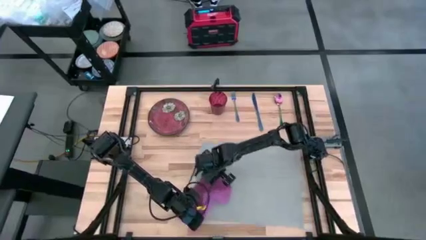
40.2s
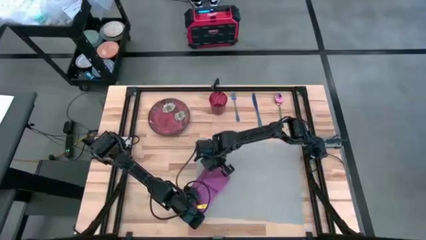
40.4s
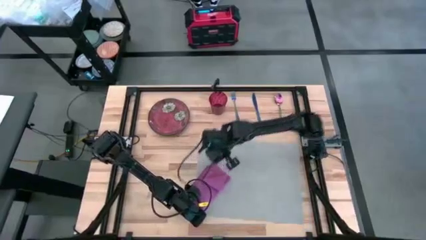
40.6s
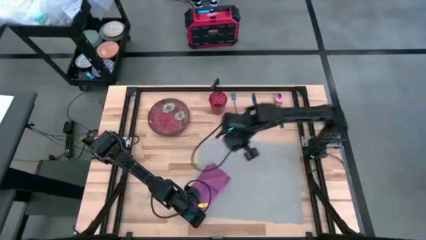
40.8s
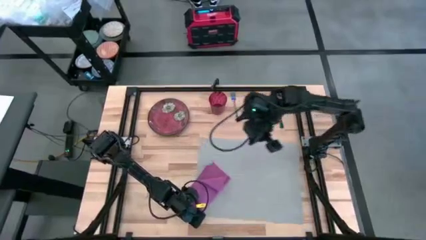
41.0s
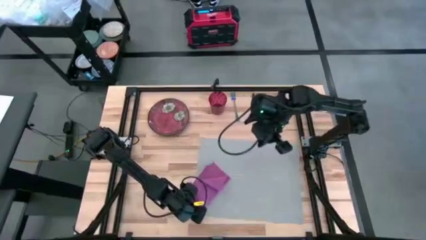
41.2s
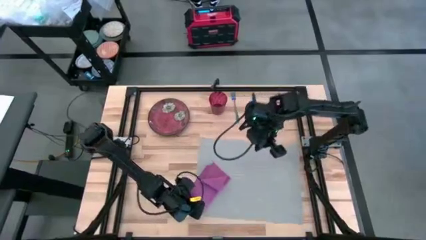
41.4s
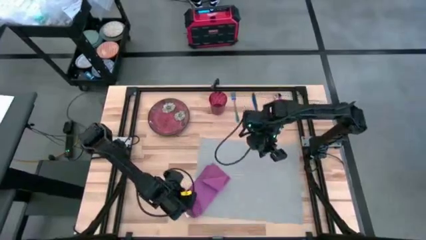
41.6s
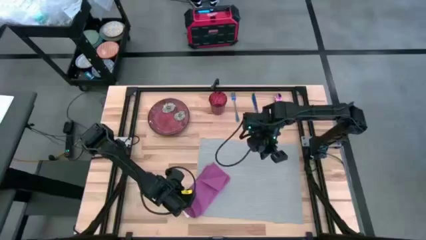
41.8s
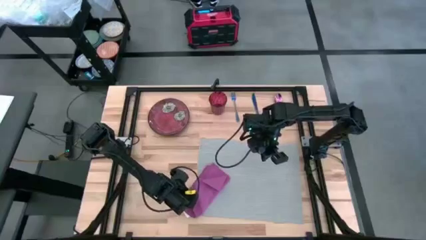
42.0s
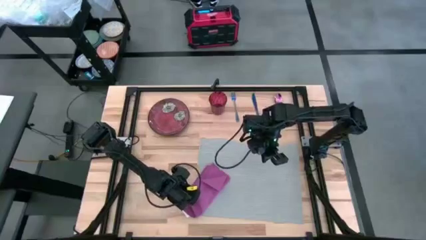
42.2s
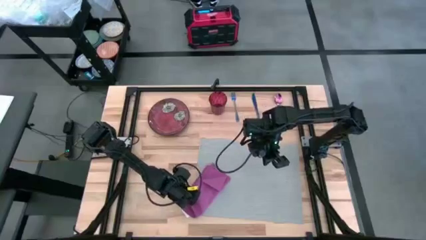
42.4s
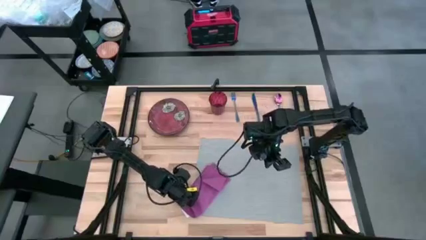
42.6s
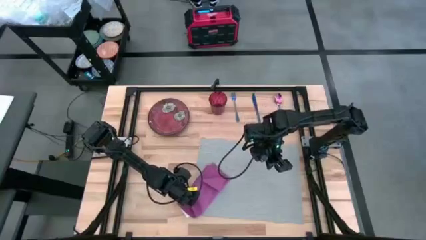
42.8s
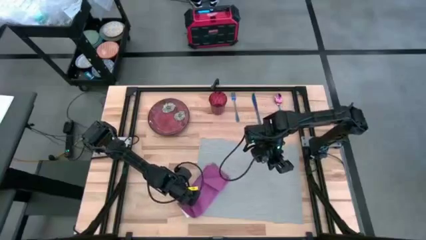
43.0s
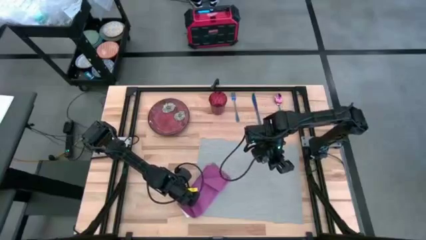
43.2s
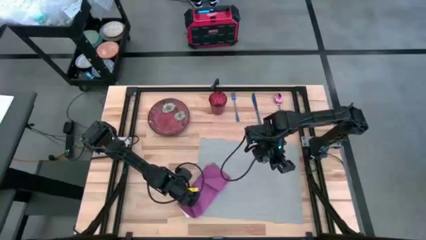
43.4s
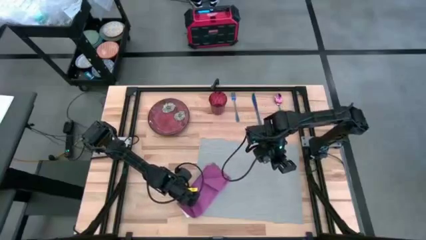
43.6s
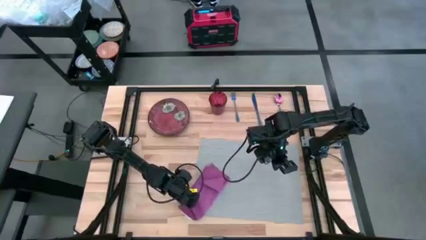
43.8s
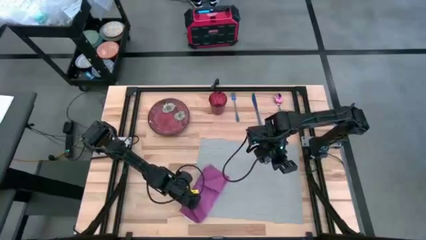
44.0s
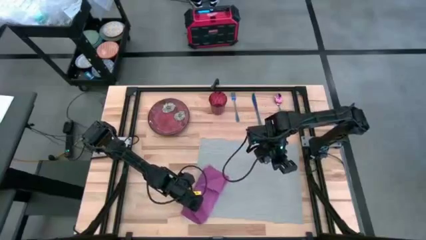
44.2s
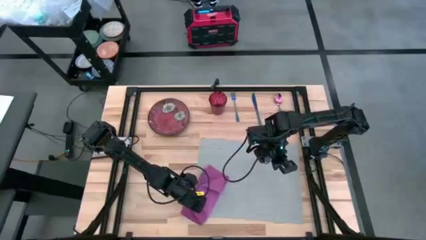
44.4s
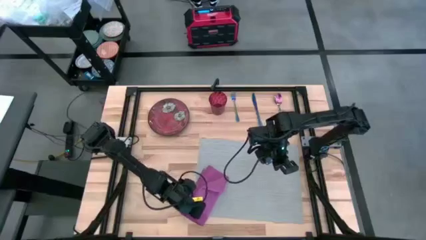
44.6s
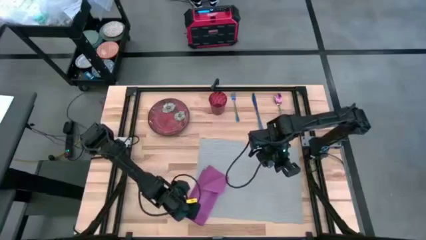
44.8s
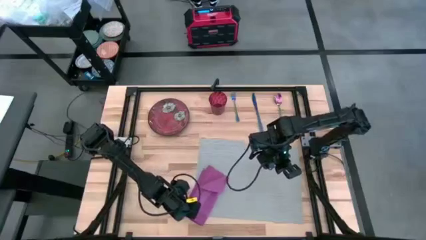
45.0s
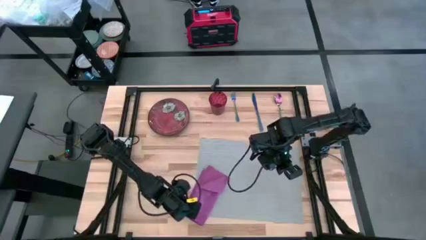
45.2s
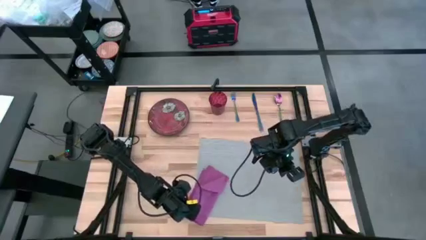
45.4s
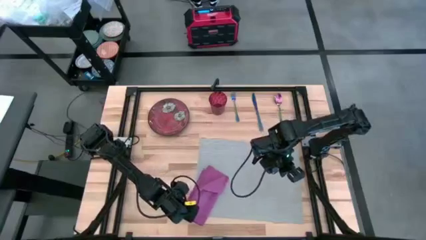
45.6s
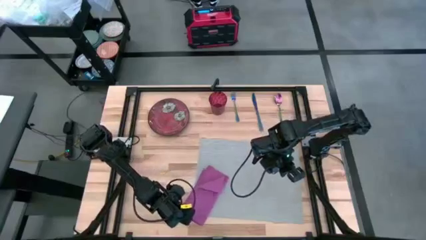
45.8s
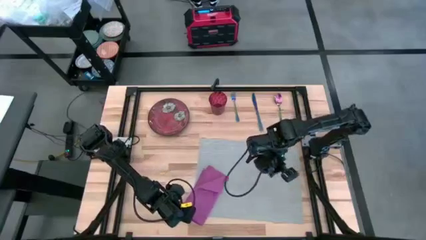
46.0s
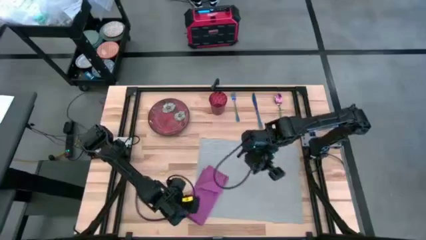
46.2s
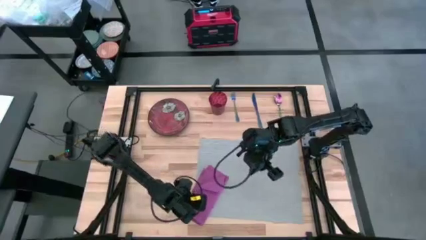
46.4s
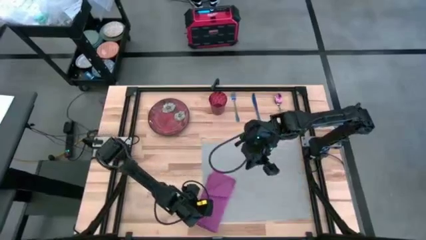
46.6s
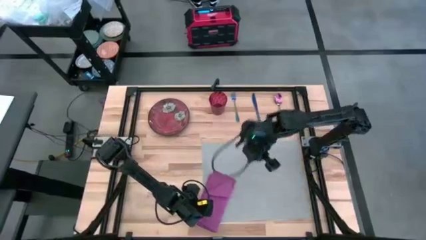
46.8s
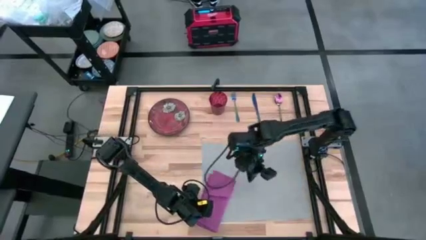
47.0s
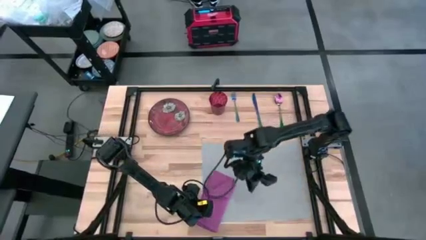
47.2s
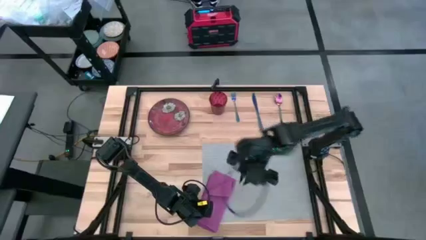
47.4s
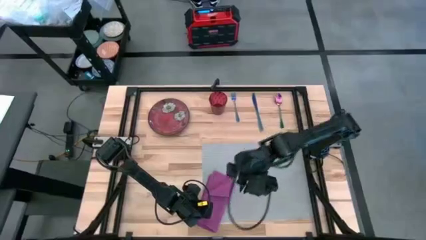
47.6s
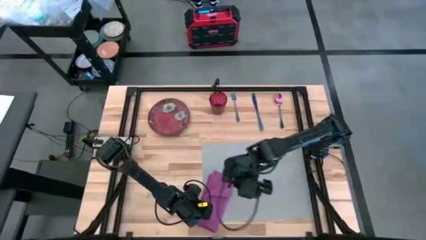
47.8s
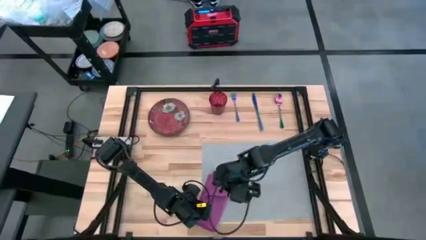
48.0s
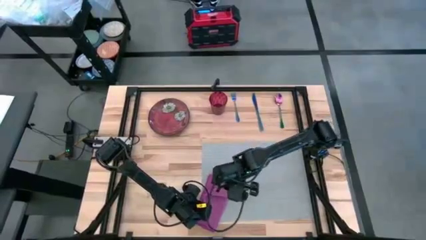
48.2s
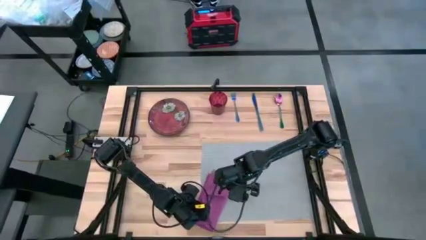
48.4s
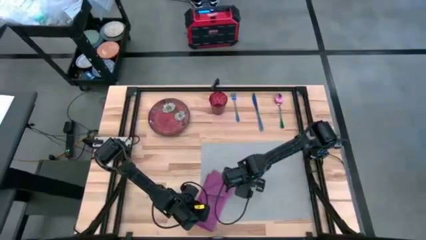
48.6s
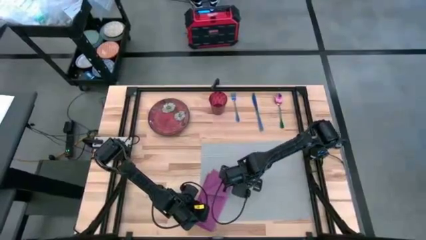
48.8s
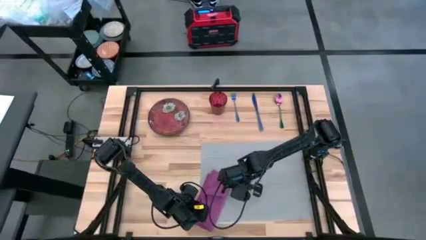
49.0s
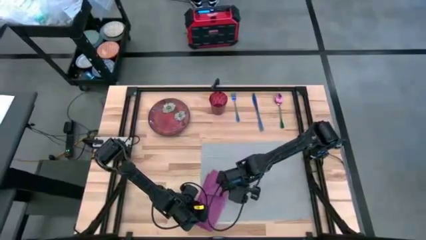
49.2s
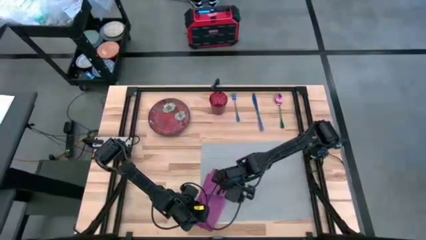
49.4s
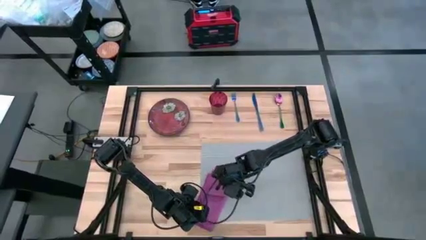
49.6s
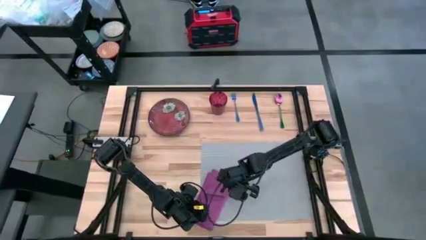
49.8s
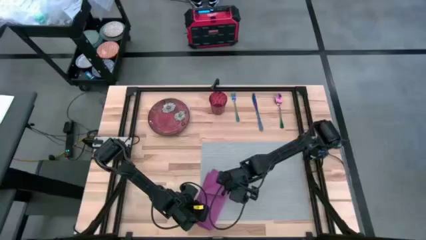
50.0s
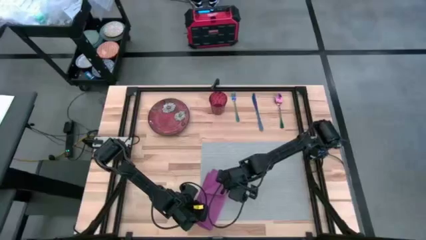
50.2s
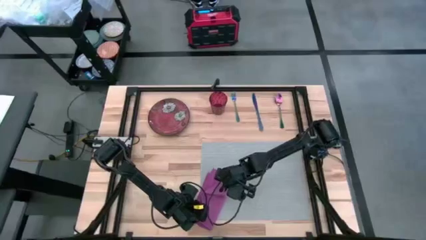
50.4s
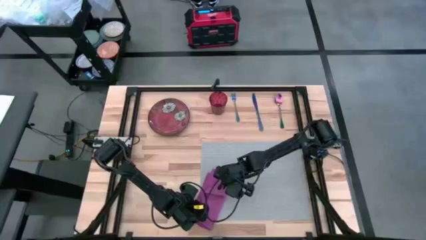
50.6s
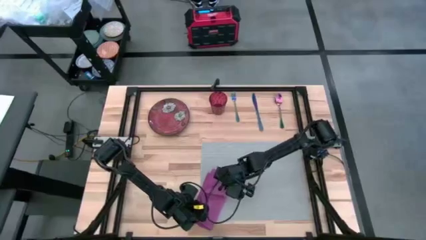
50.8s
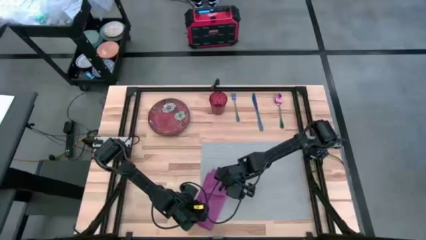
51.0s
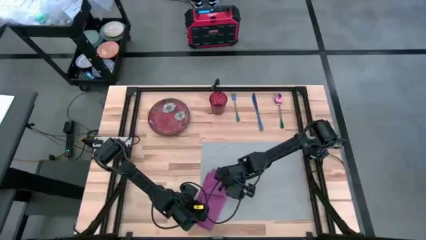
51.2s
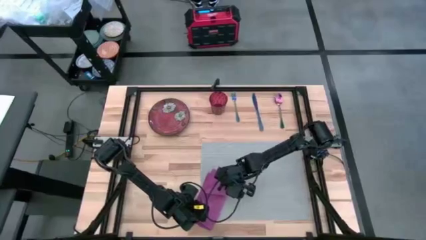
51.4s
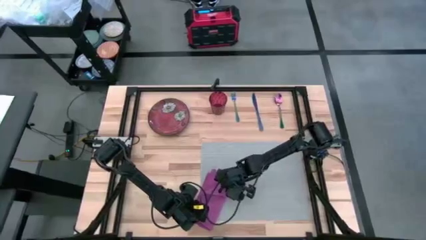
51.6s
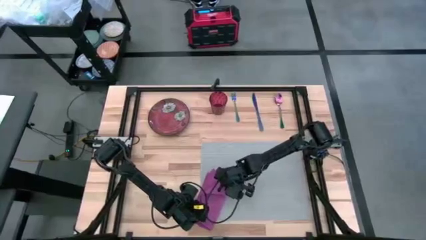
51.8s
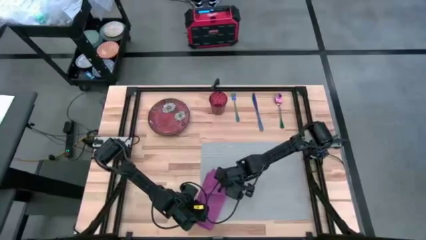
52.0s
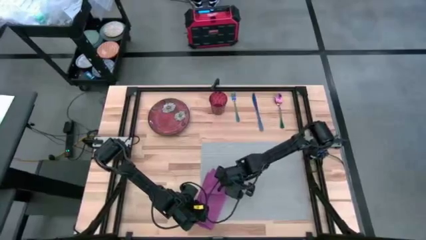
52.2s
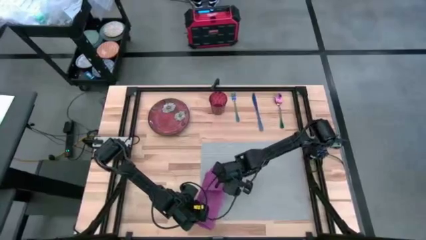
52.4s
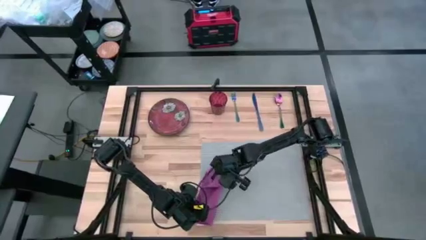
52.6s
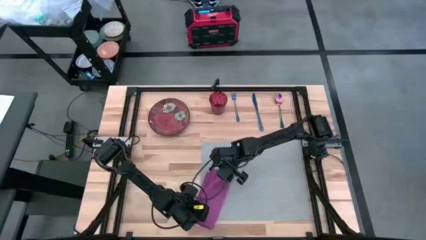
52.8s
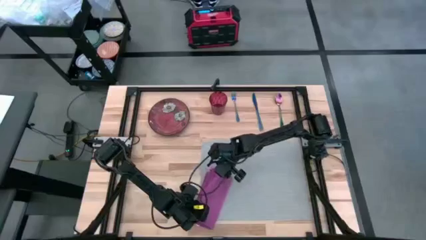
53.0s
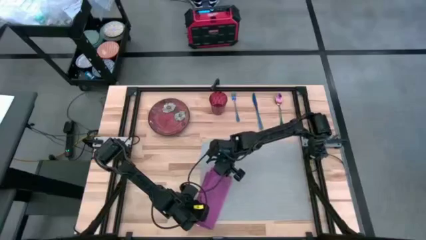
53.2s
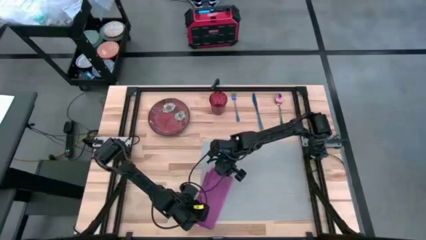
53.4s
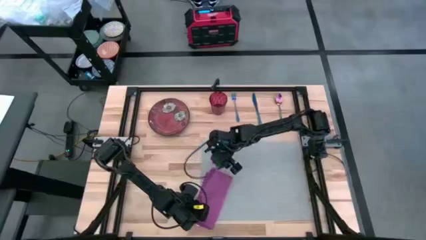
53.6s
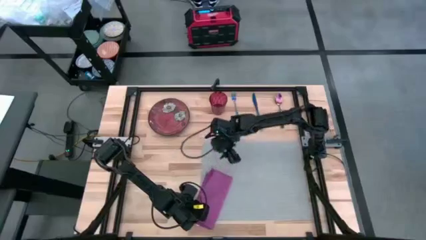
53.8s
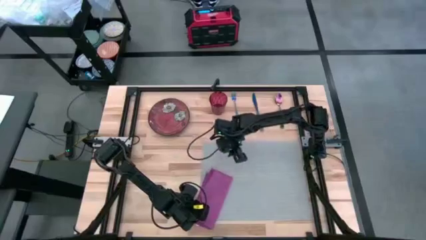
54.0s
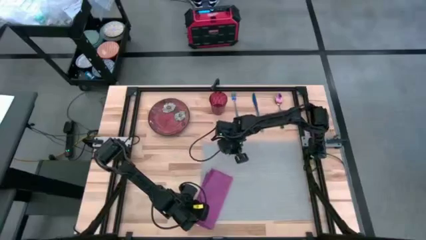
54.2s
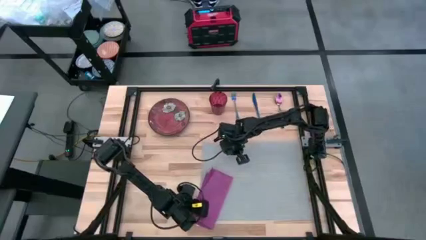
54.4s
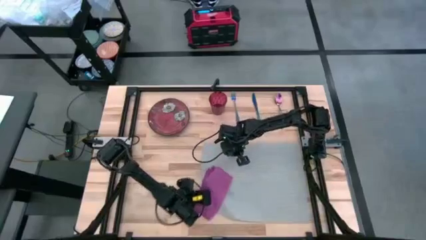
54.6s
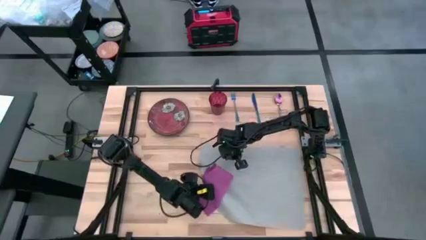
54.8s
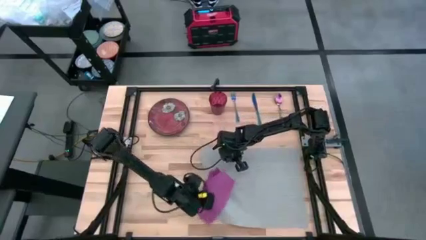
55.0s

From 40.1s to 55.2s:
Task: Set table place
Fold the purple napkin

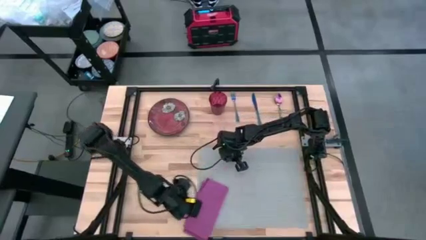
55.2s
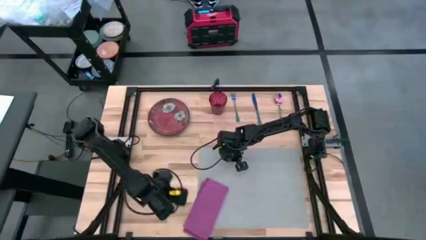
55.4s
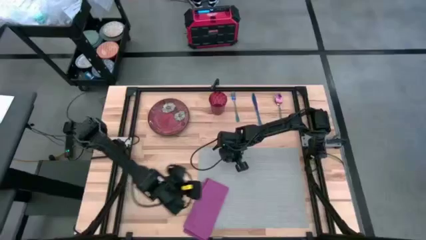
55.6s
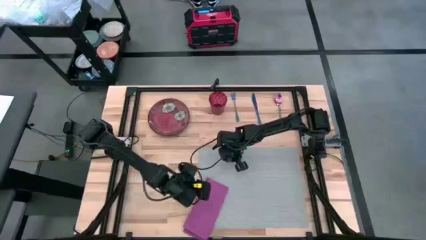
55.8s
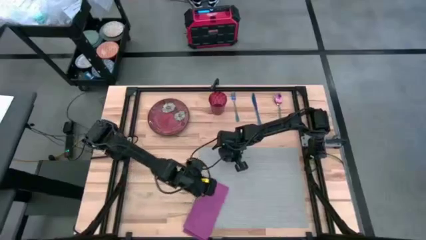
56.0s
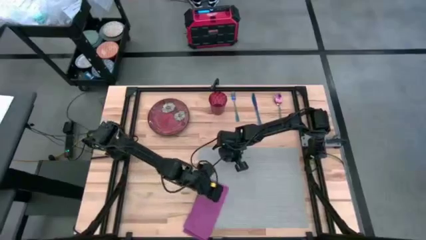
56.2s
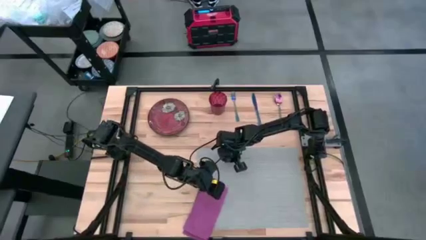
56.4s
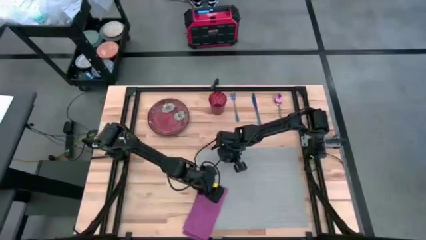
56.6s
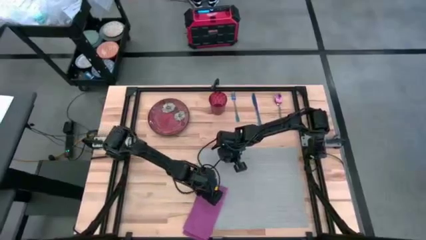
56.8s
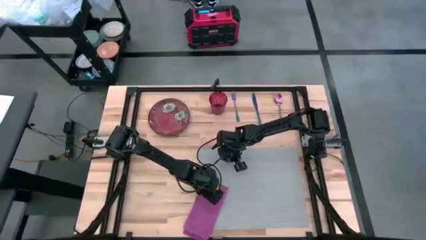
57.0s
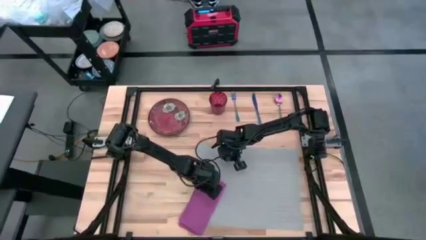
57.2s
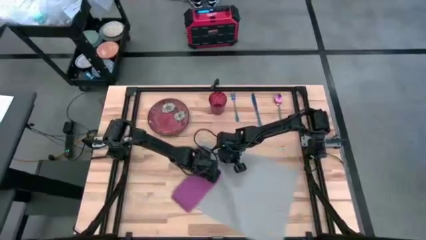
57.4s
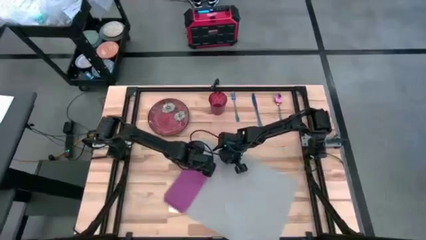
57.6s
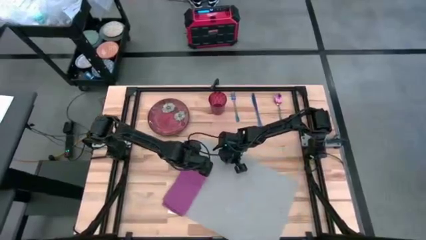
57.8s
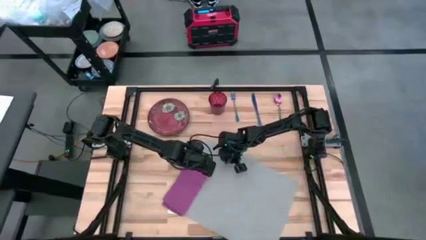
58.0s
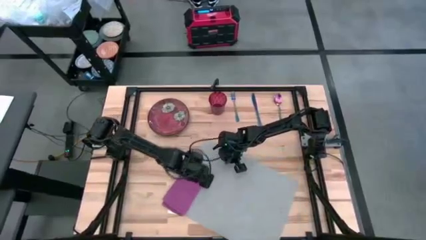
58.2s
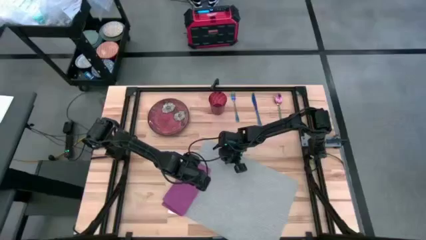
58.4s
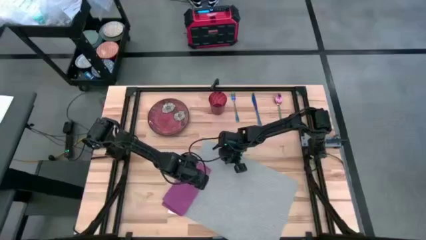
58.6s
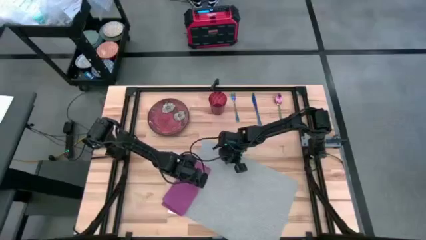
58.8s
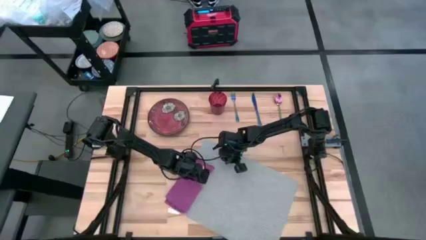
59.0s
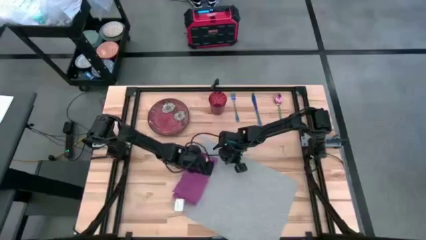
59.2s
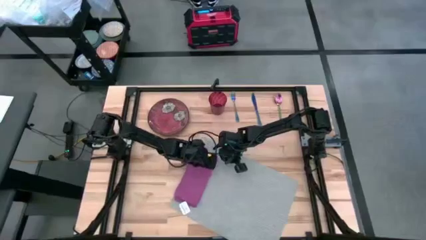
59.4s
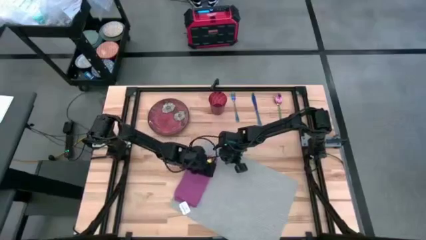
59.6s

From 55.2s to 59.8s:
Adjust the folded purple napkin
